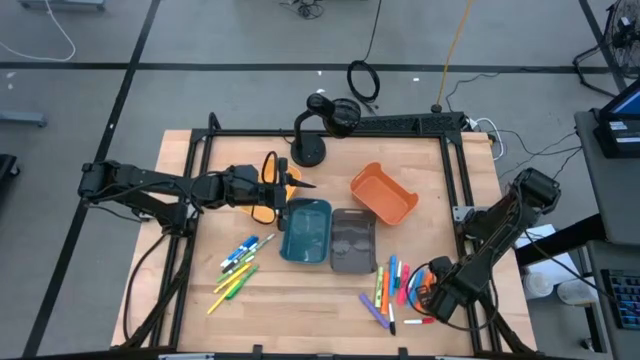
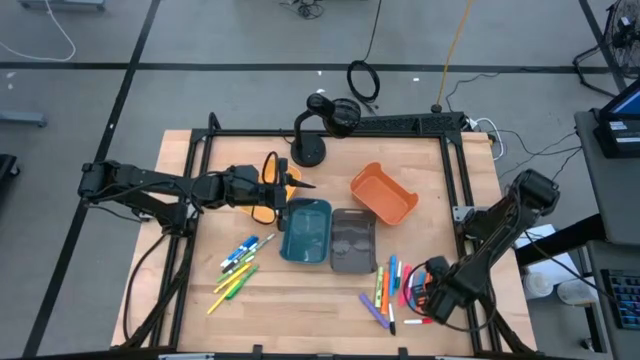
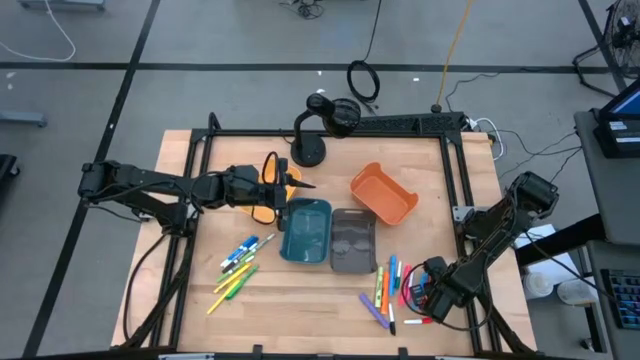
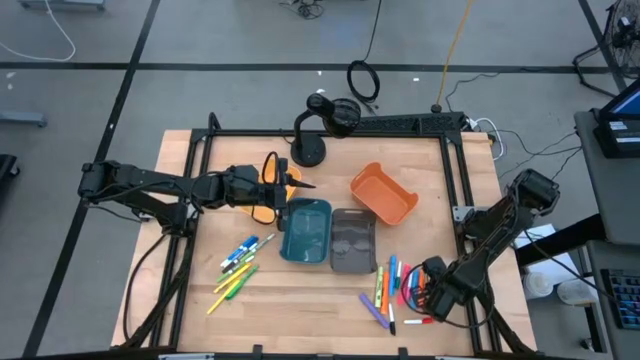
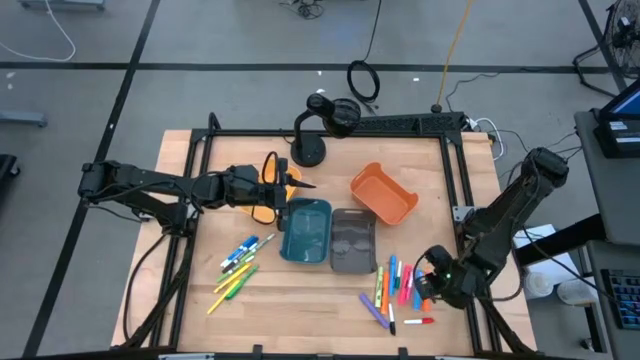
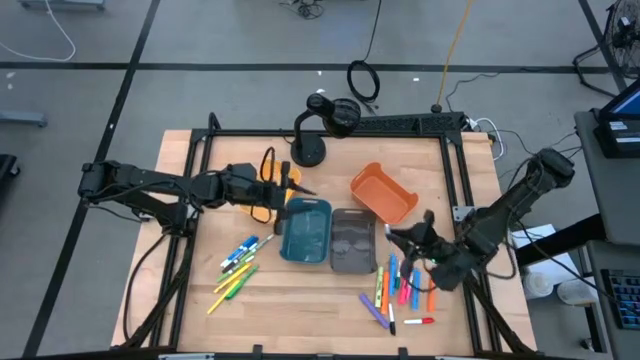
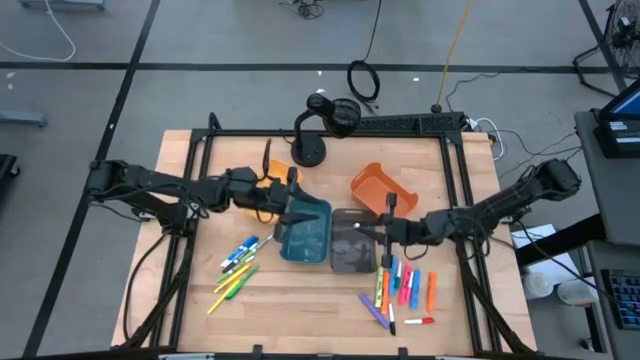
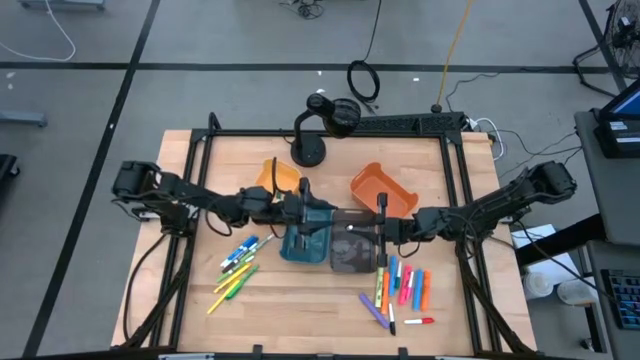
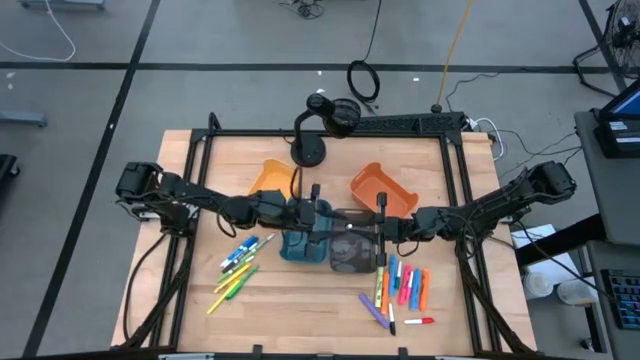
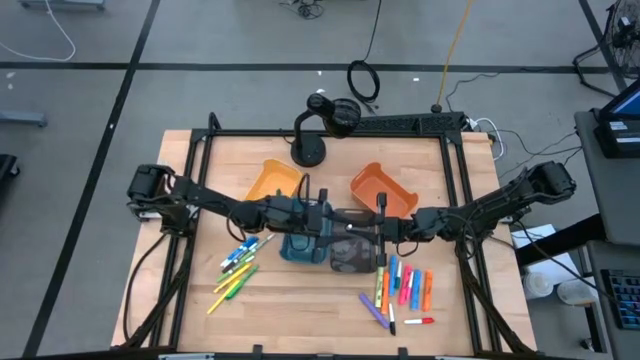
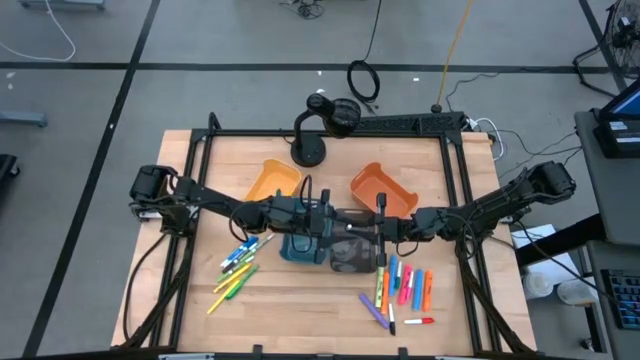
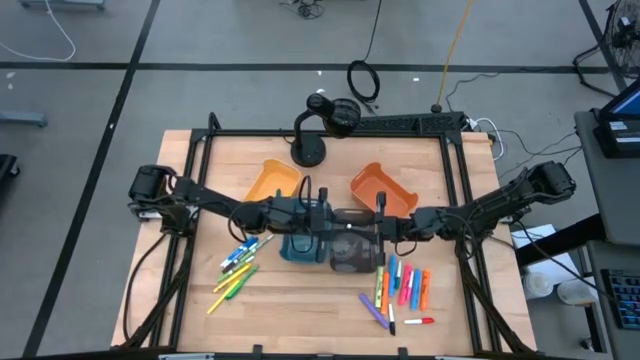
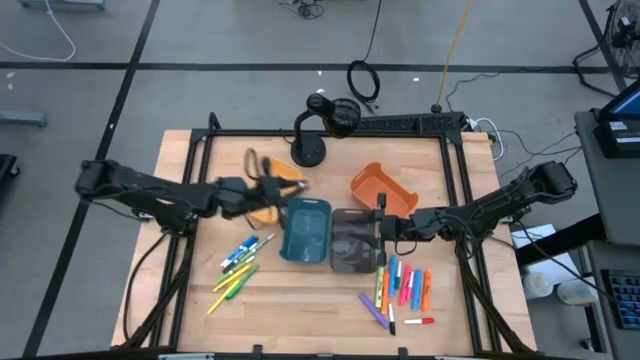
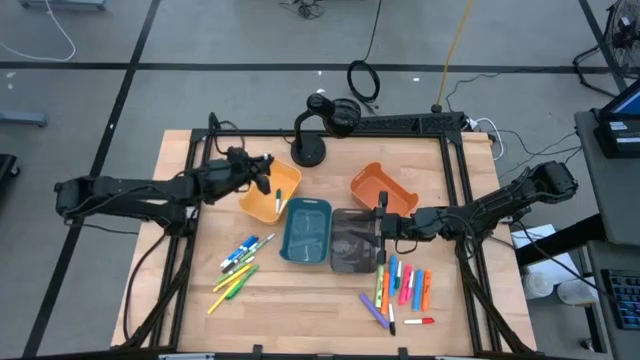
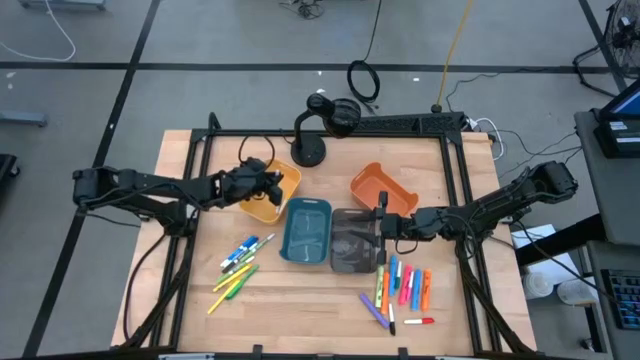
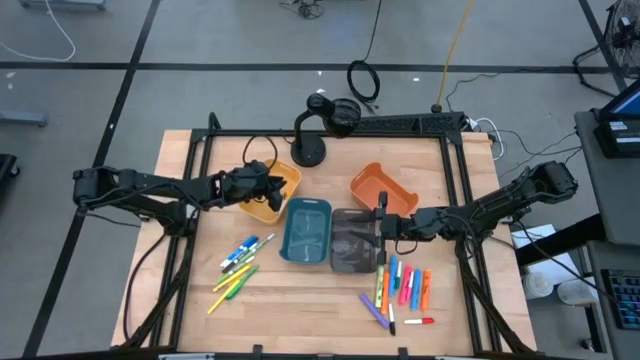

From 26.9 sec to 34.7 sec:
Task: Pick & Place Markers
Put the right white and black highlighter into the yellow bin

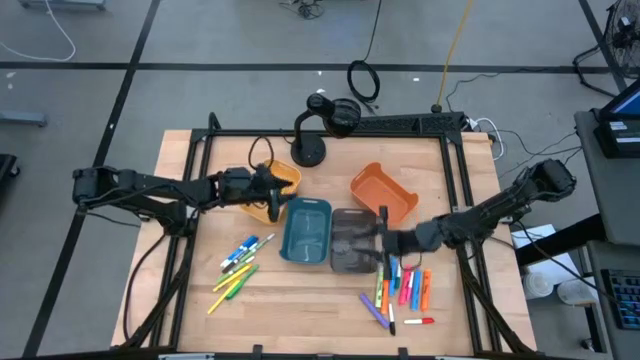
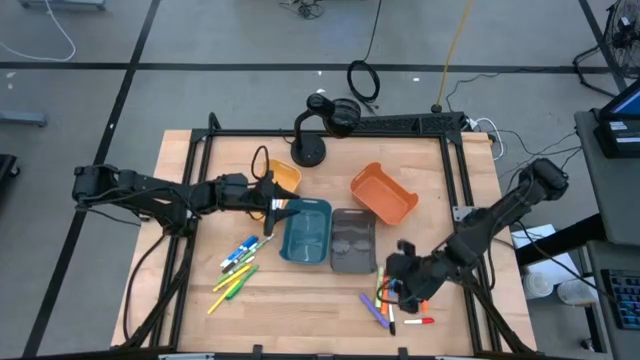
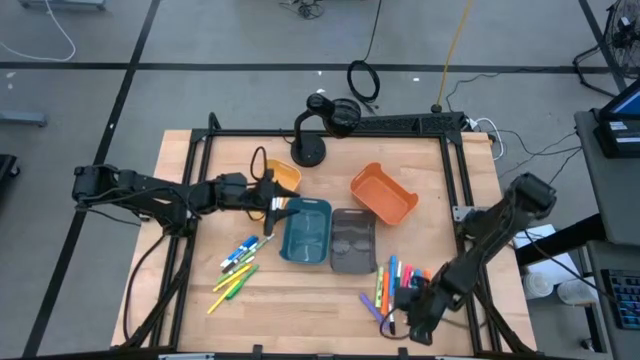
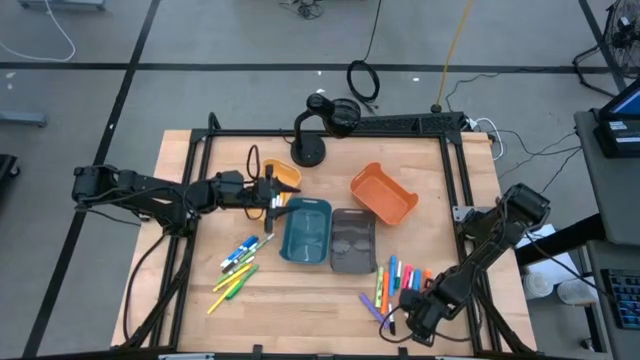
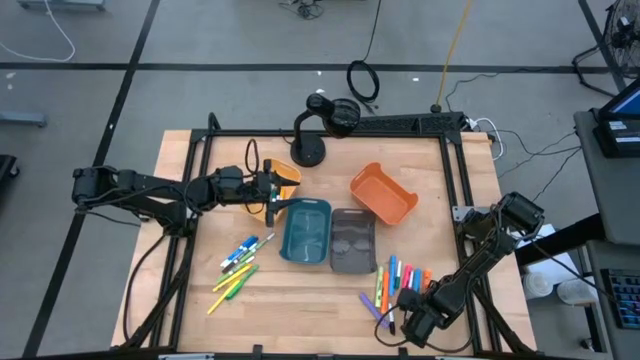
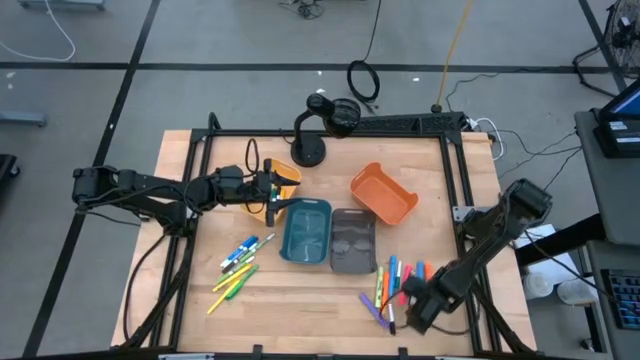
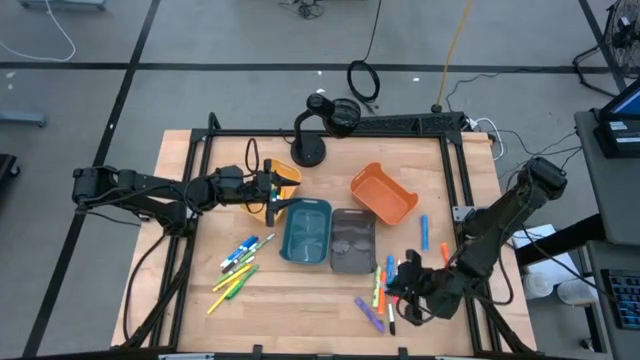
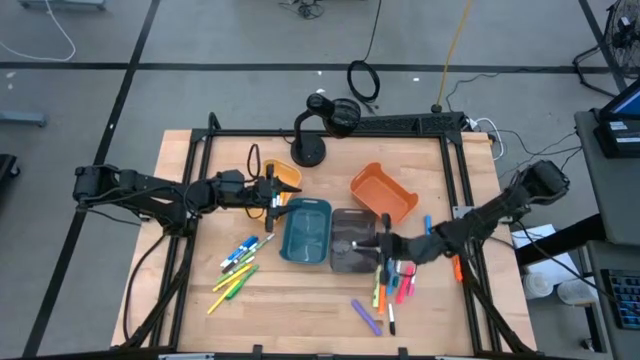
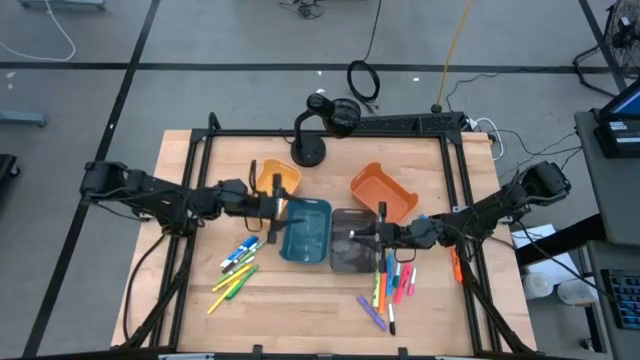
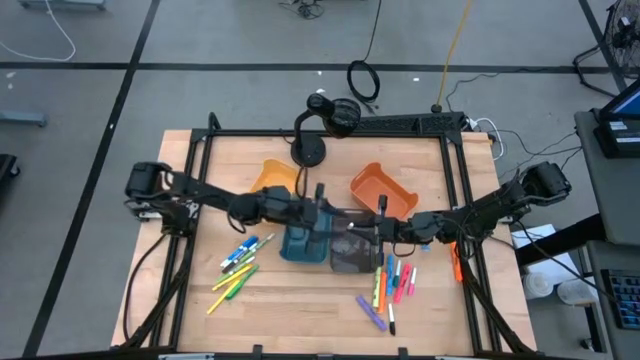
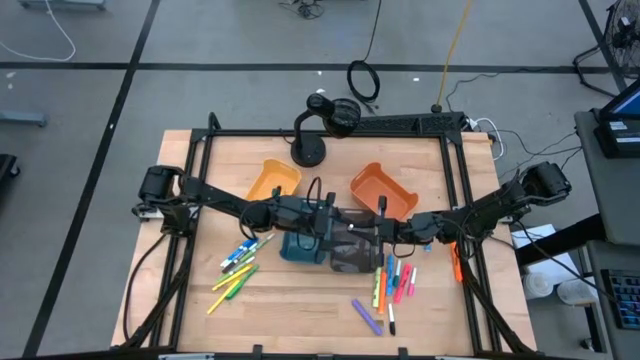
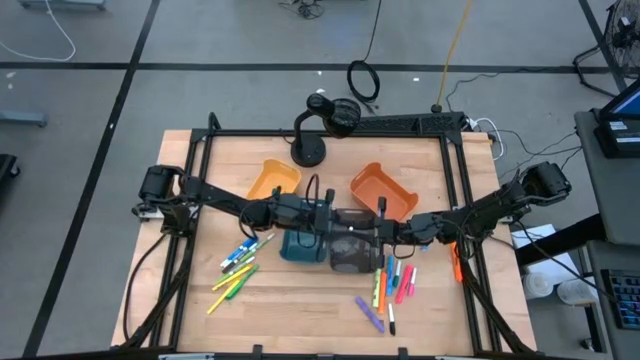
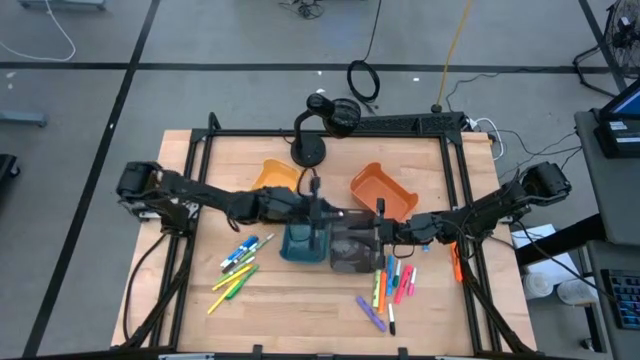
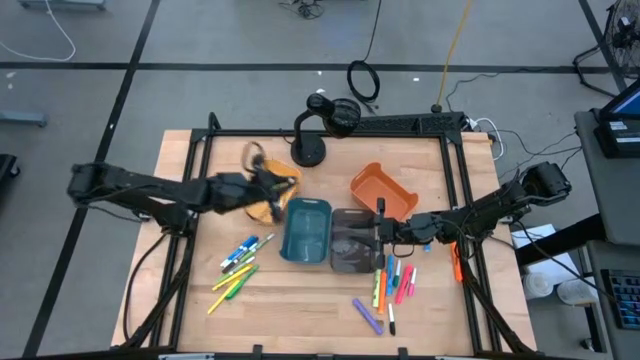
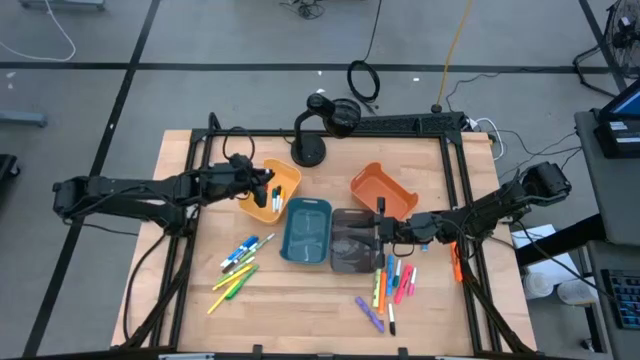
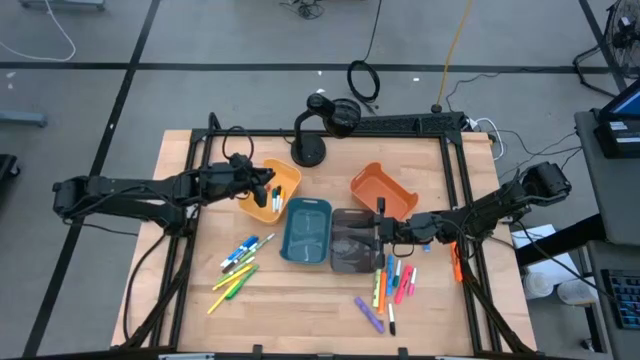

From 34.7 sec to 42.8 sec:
Put the white and red highlighter into the yellow bin

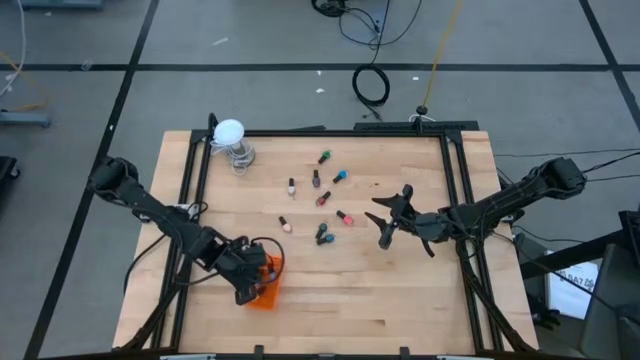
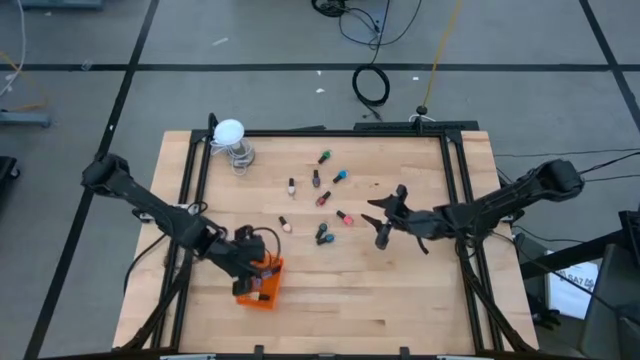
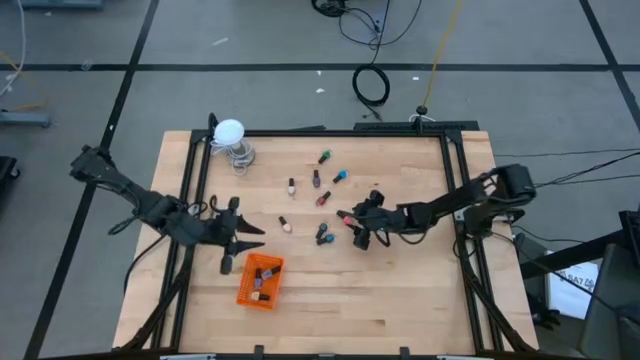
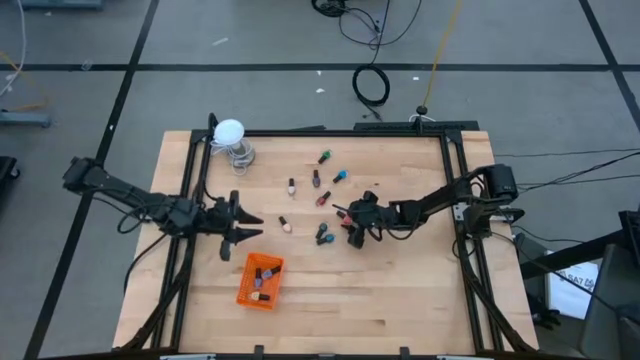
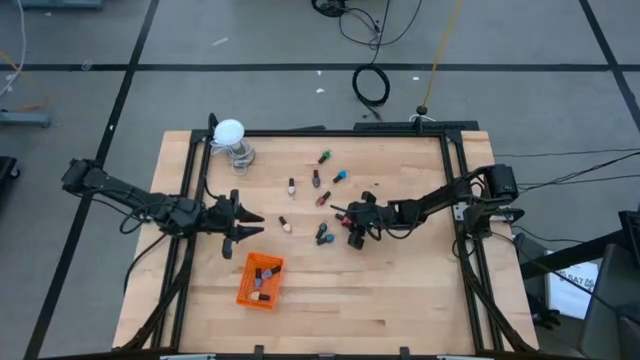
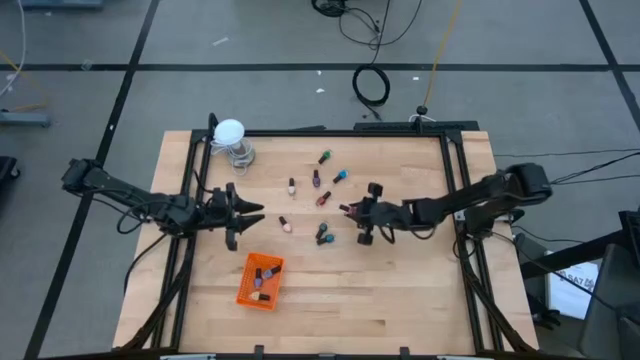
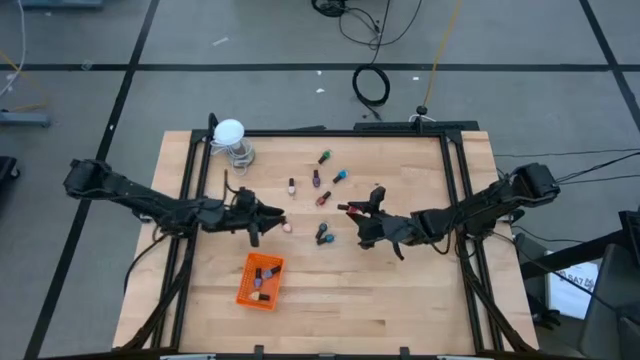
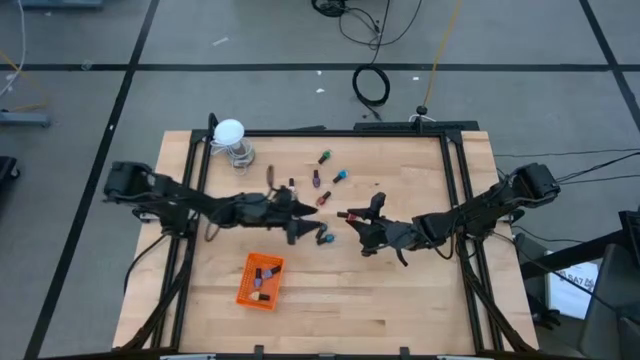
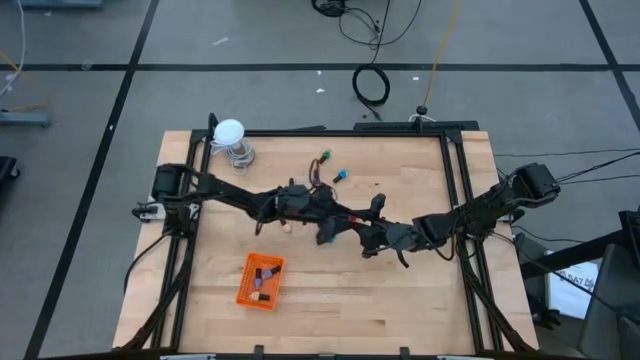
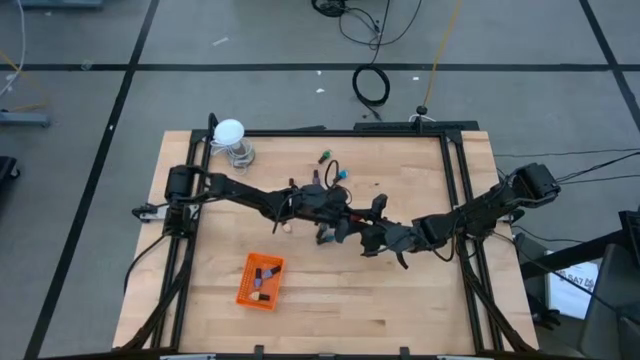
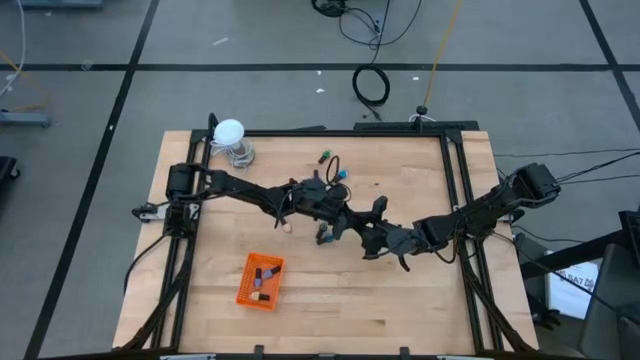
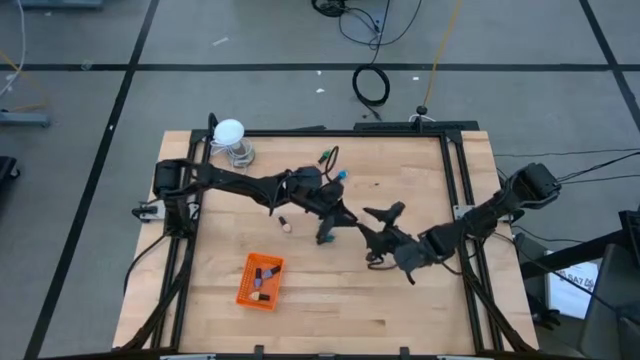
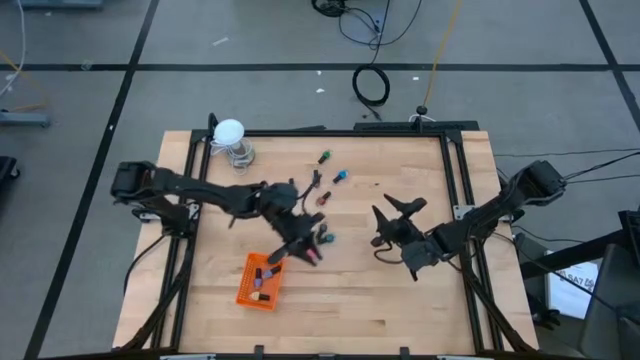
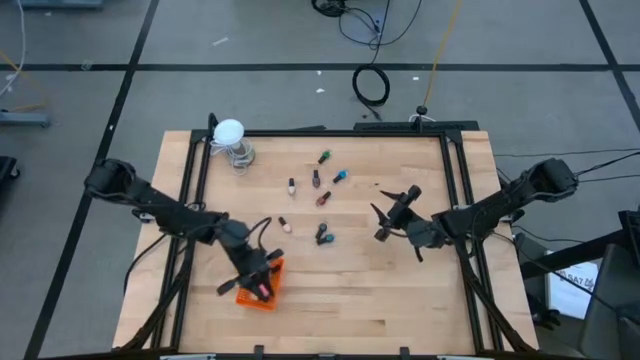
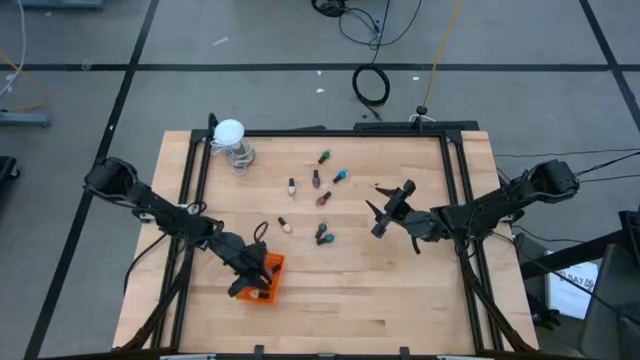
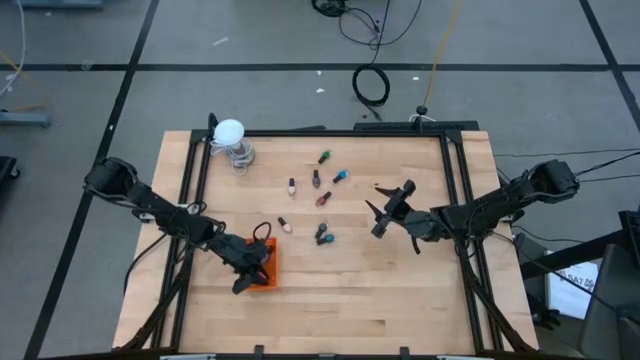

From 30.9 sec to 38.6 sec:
Task: Pick & Place Nail Polish
Put the bottom red nail color bottle into the orange bin
